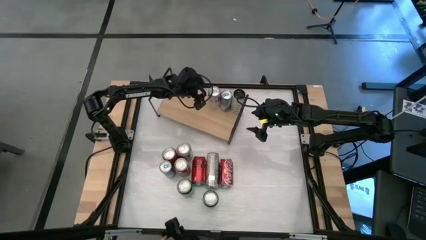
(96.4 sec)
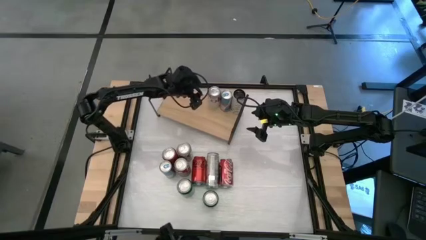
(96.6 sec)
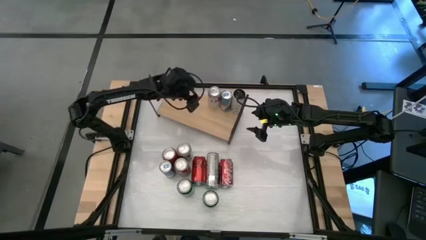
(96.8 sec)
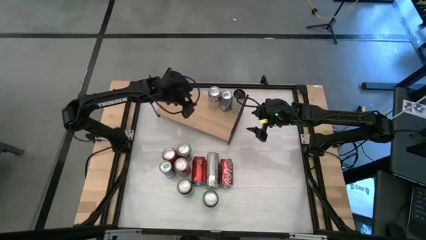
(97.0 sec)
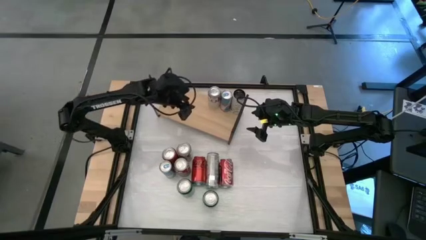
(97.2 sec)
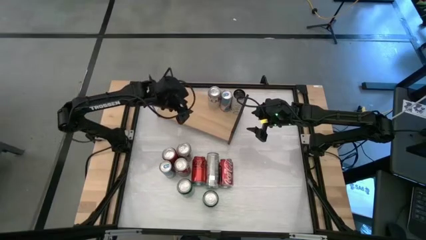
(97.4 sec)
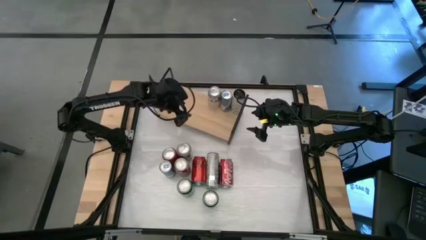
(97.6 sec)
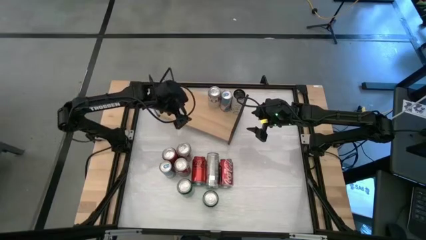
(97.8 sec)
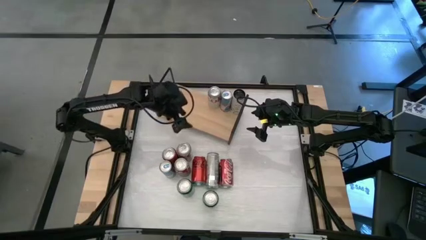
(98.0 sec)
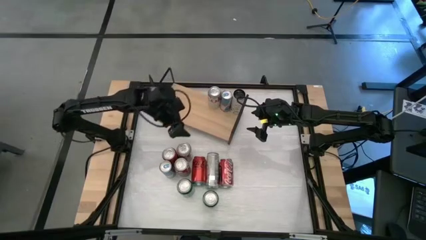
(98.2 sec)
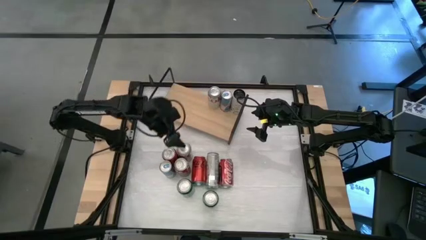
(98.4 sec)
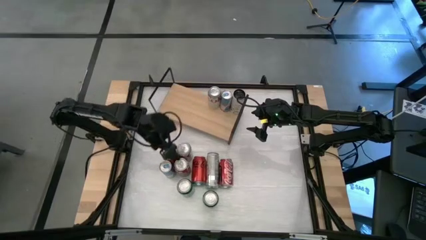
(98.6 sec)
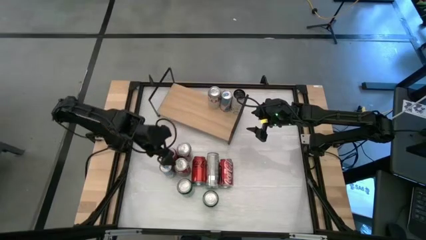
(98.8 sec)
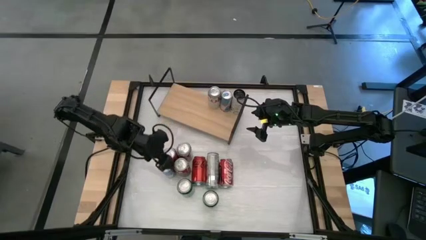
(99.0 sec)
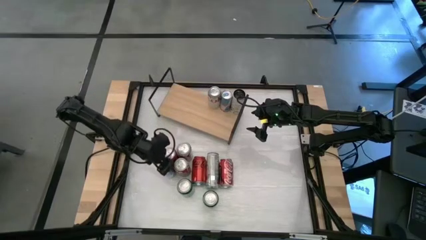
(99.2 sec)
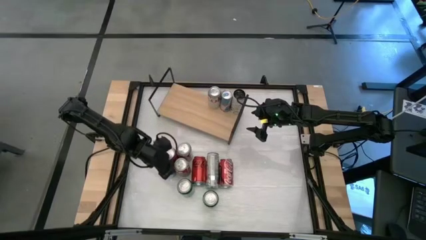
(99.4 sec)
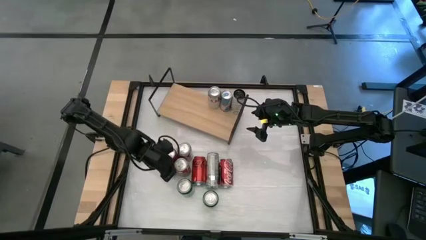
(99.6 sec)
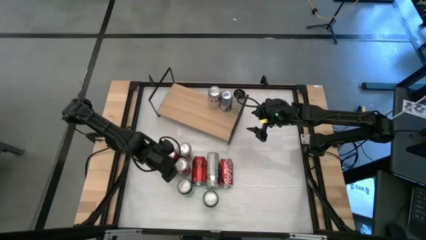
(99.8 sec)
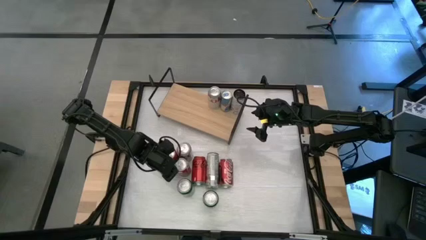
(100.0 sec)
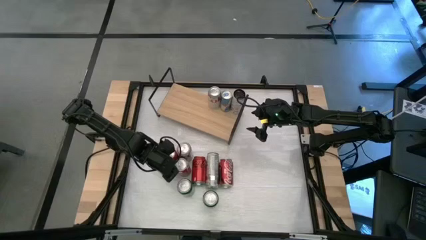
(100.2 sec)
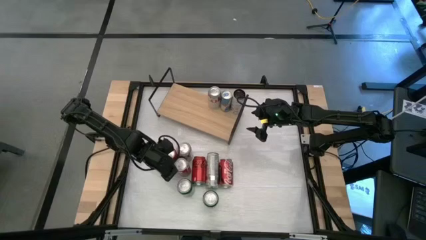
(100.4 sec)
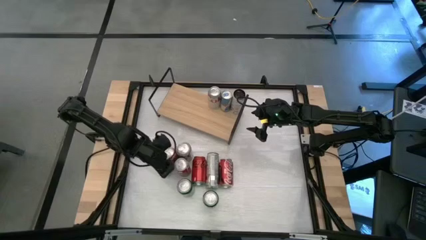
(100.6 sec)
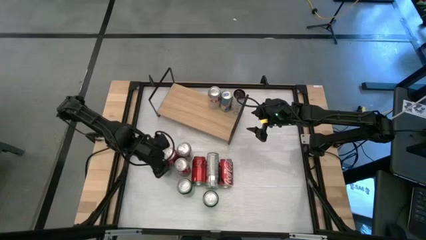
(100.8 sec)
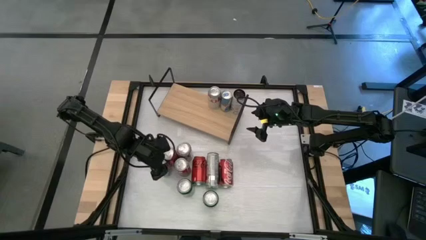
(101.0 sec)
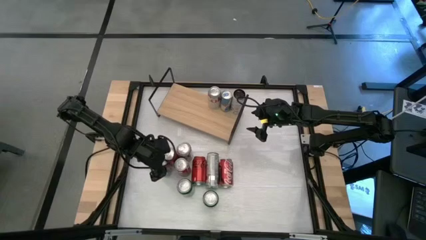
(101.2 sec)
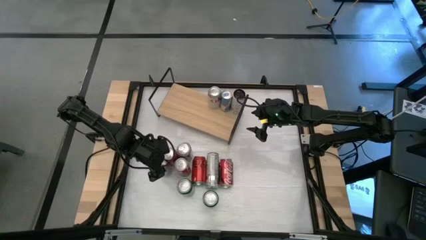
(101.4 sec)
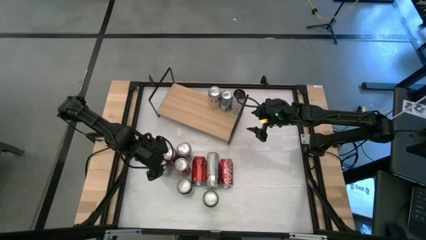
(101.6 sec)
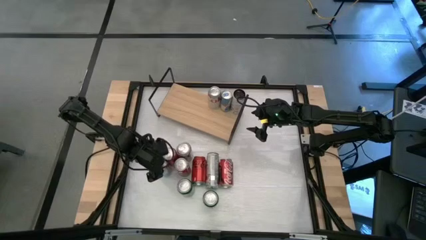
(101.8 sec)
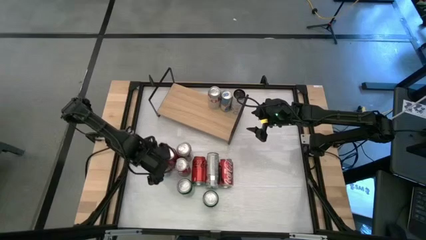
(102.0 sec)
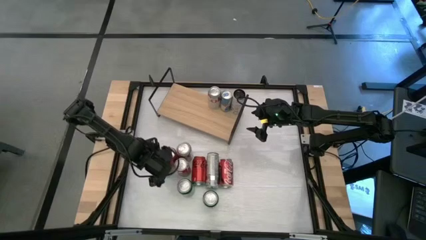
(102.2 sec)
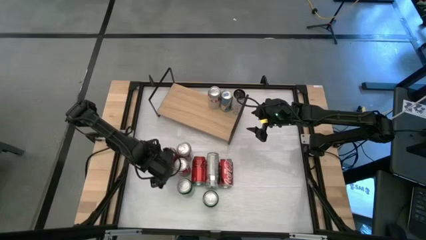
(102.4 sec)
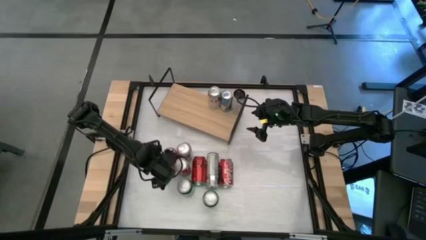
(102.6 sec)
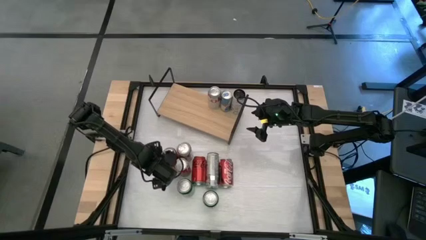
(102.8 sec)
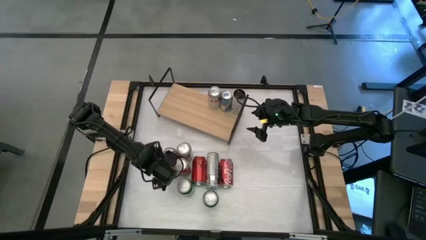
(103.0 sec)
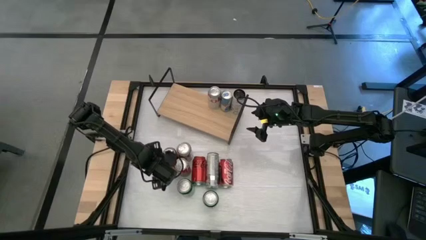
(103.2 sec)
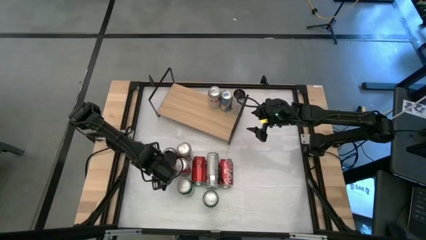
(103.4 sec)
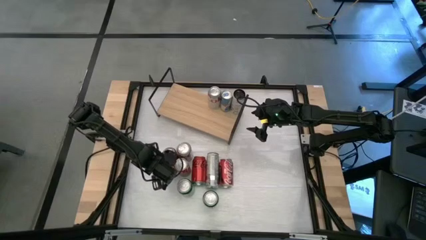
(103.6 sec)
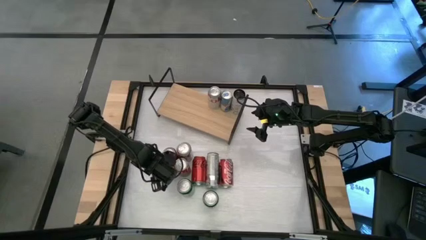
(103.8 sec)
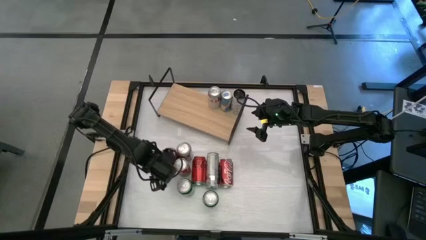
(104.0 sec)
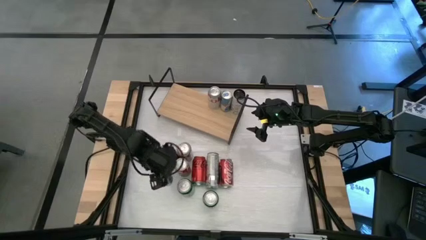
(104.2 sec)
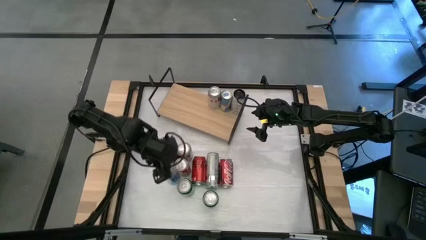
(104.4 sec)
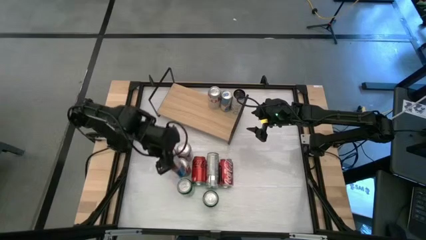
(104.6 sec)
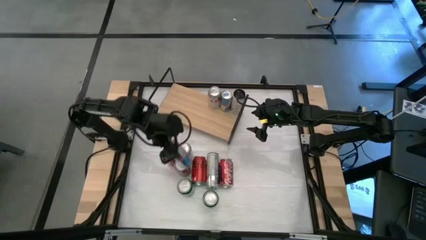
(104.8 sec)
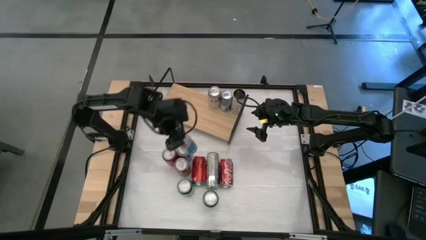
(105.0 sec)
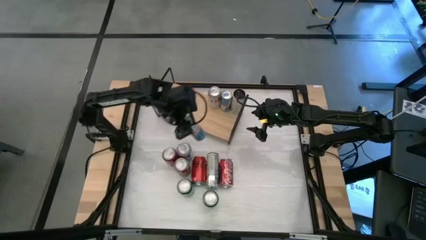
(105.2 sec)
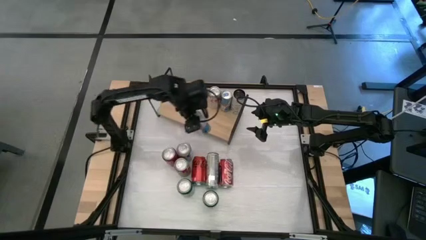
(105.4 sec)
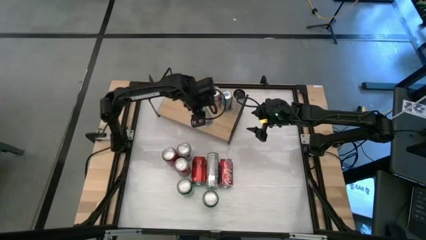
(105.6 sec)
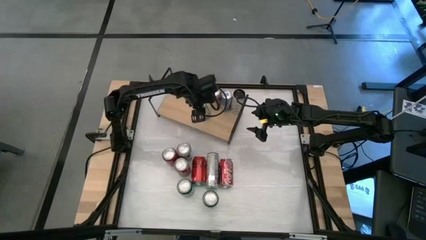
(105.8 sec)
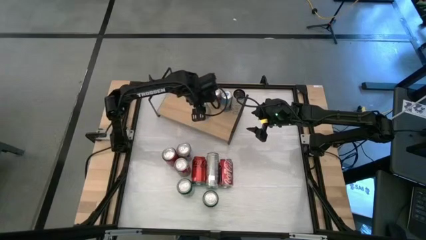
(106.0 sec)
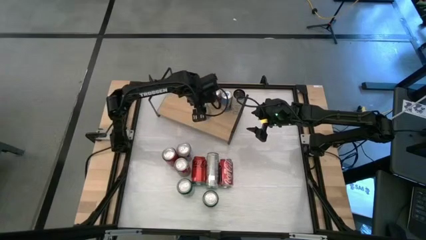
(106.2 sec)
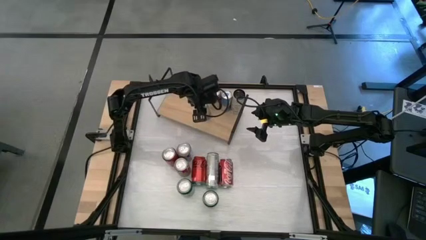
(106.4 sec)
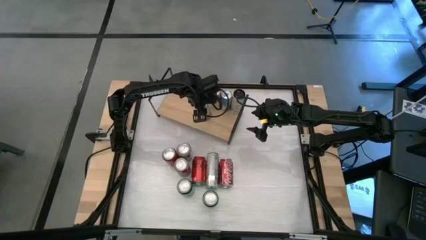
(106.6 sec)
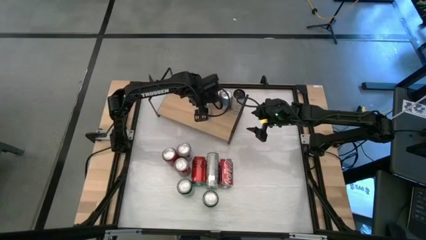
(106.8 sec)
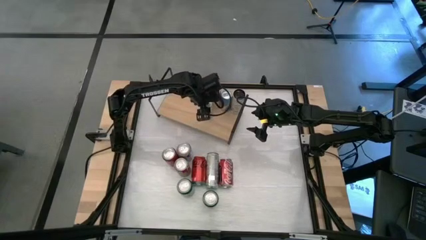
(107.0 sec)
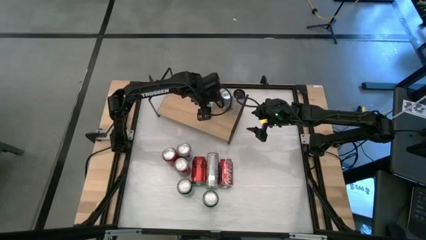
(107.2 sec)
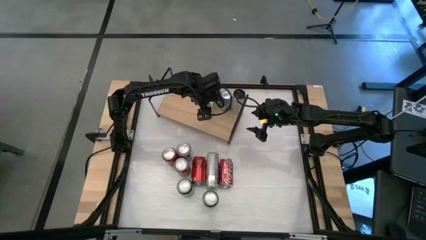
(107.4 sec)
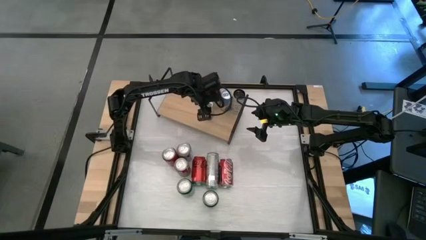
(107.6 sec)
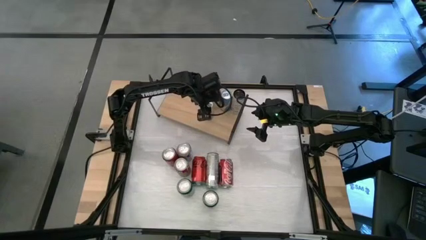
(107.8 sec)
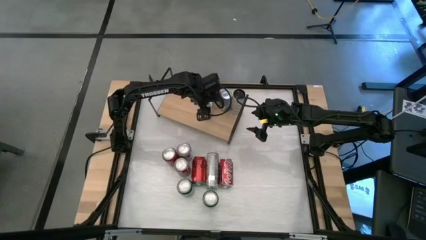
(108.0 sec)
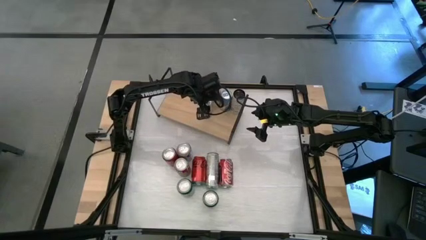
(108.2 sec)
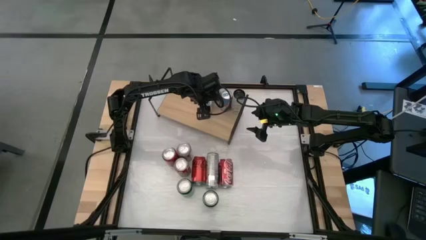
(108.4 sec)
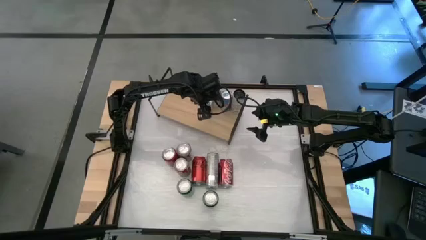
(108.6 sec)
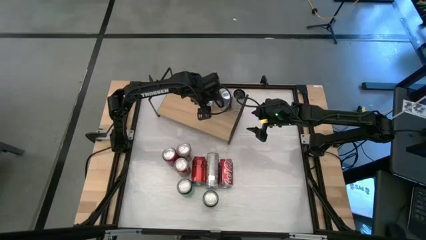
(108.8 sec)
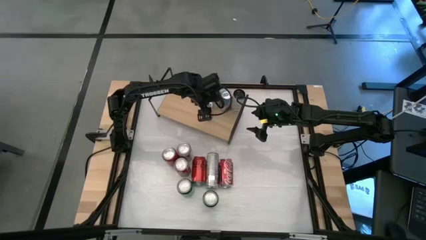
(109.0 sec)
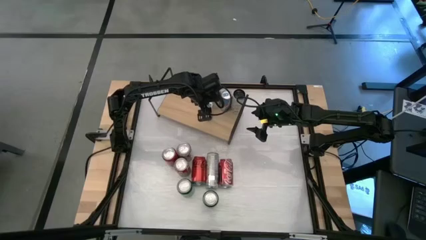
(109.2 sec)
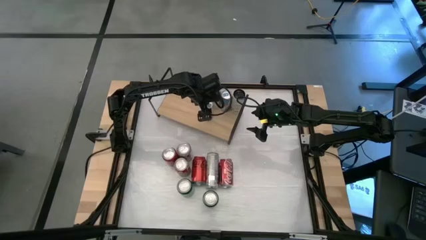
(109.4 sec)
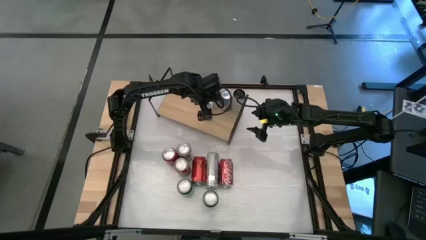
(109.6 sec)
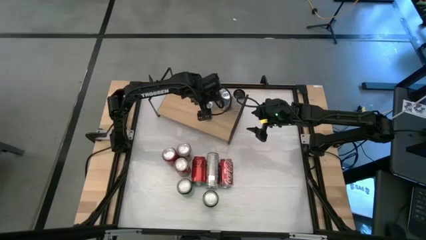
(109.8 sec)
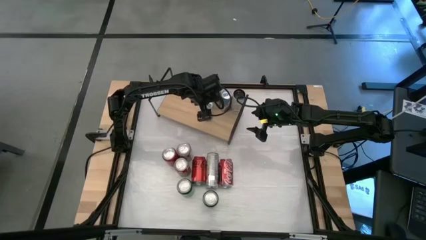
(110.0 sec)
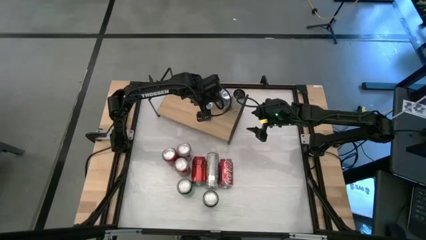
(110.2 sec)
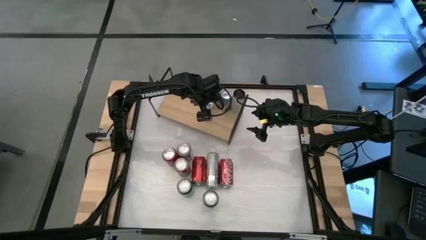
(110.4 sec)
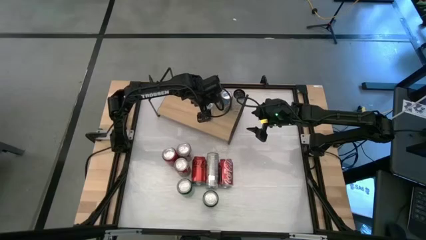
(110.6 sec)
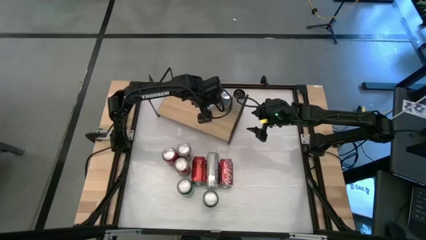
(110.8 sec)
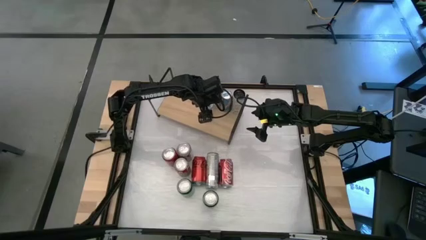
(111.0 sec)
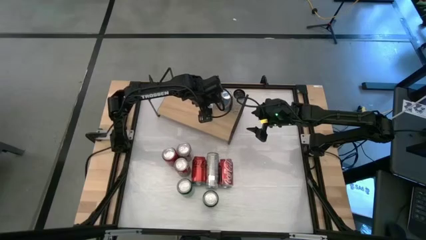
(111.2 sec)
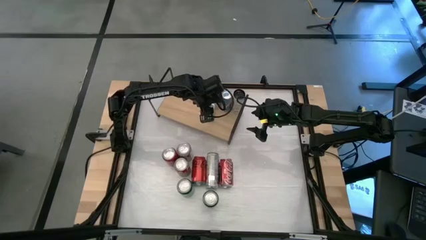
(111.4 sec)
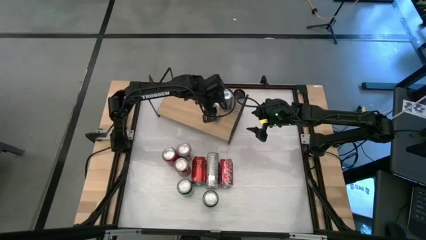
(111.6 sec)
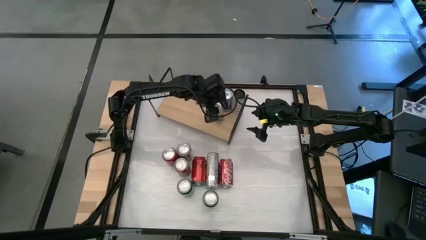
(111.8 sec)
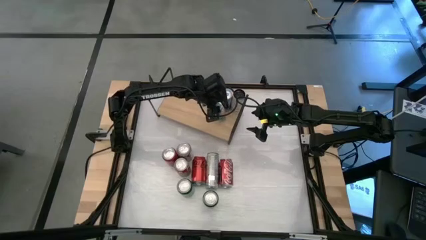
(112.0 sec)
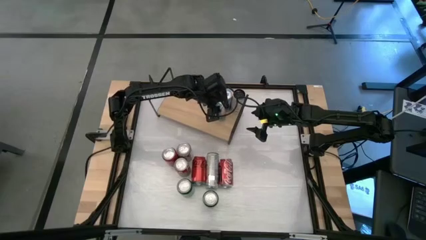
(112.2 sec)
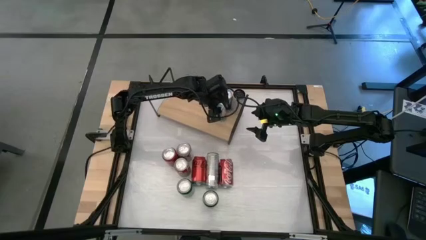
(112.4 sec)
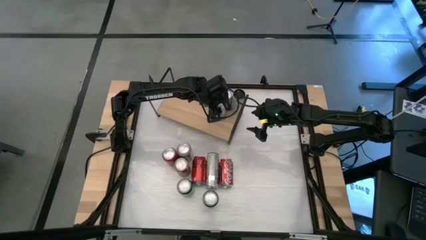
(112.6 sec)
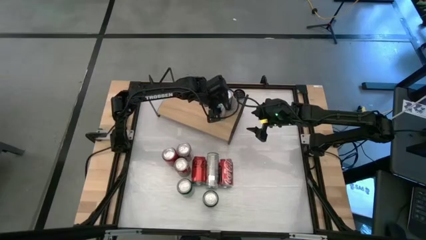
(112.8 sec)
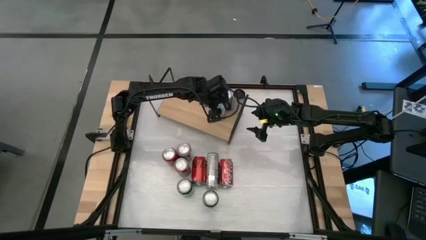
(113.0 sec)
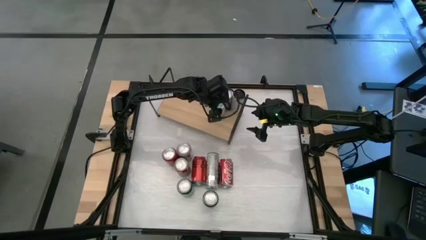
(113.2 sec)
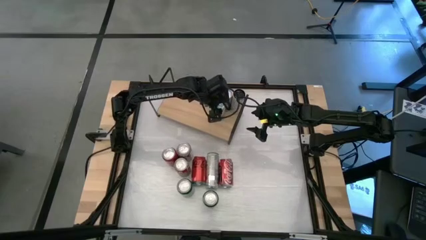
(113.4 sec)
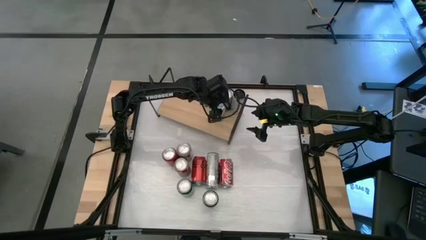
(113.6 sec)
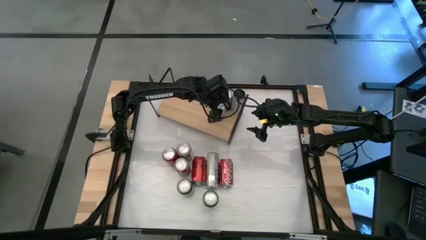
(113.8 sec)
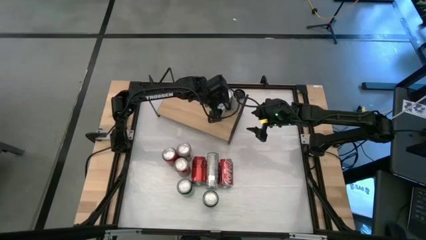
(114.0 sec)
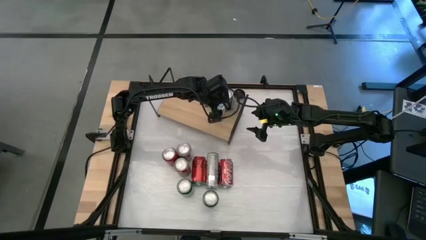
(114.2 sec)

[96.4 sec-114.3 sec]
Task: Place canned beverage on shelf
Put the blue soda can on the shelf aligned with the other blue soda can
